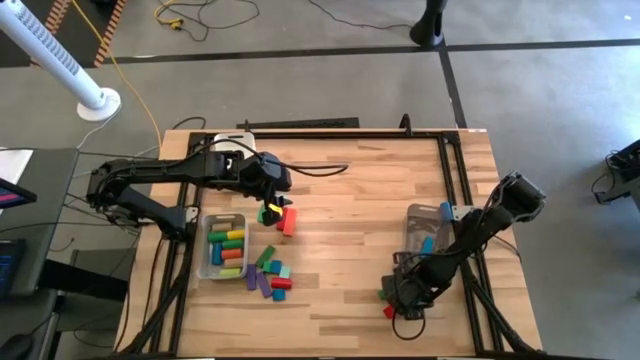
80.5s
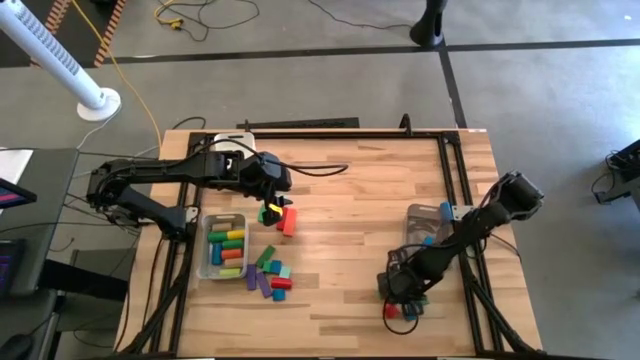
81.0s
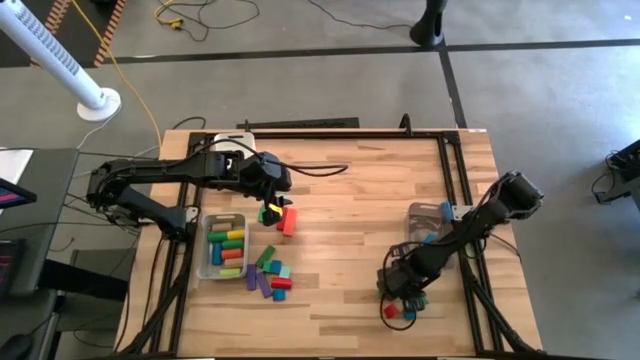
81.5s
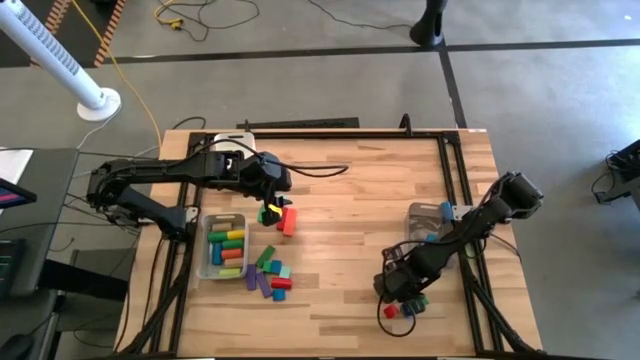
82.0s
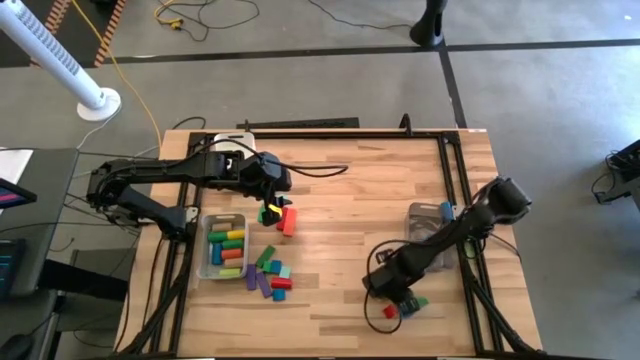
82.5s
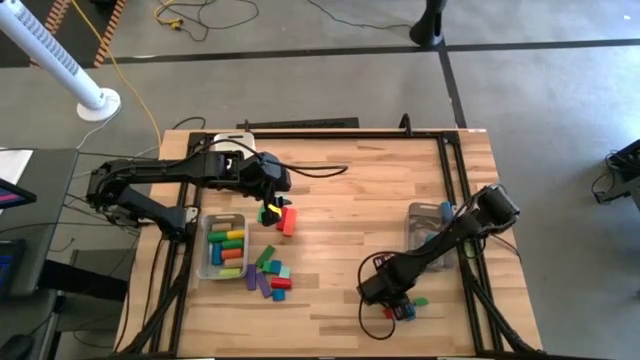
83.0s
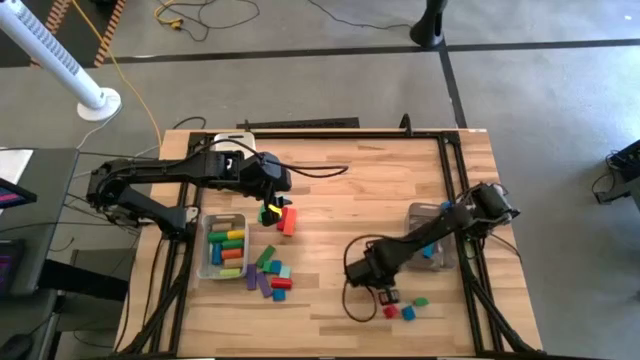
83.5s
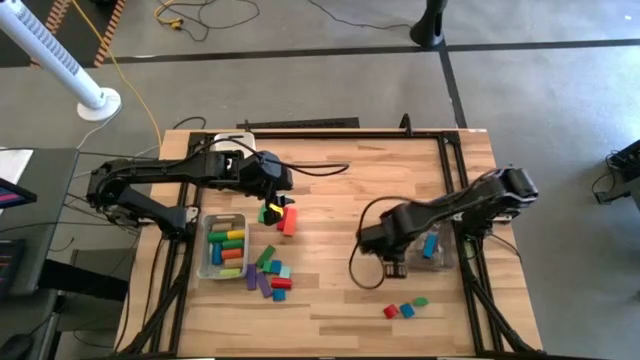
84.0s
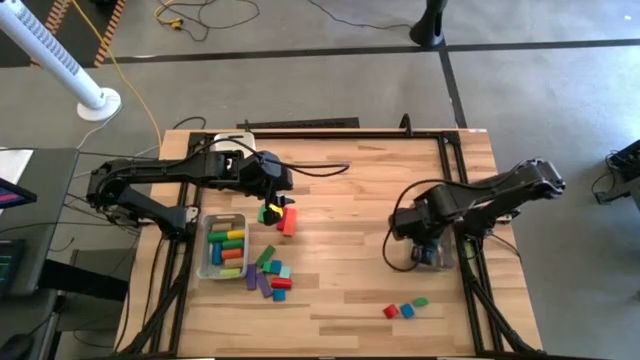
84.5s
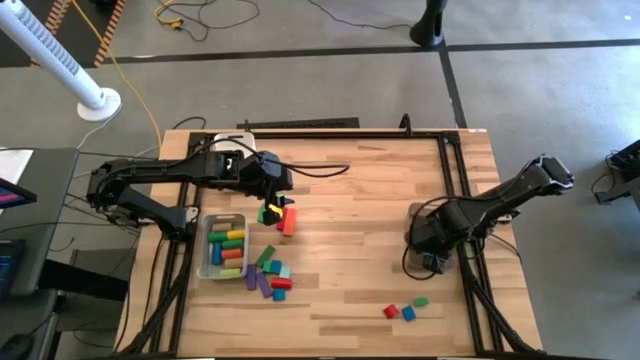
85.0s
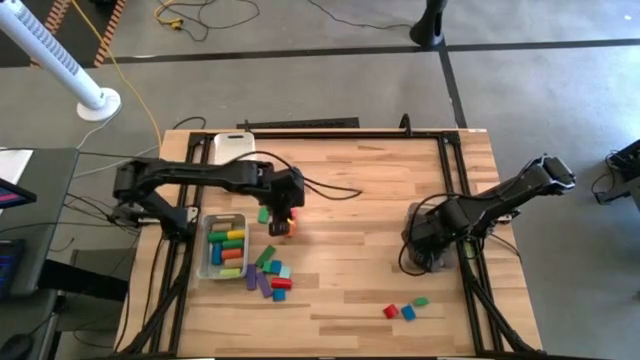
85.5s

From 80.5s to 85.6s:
Task: Sort blocks by size
Put the dark green rectangular block into the black bin

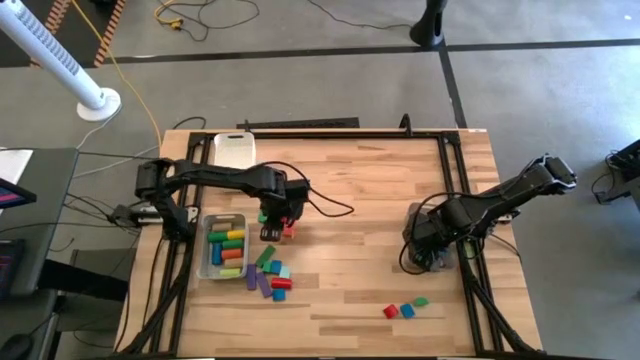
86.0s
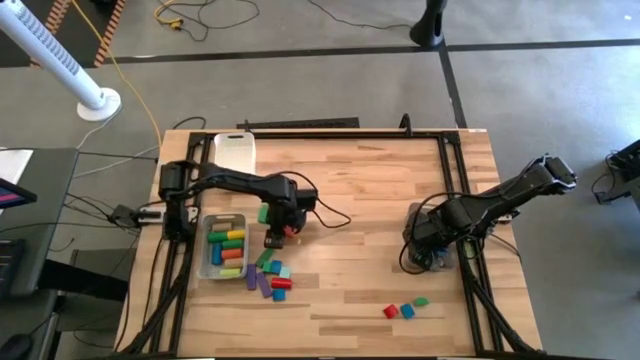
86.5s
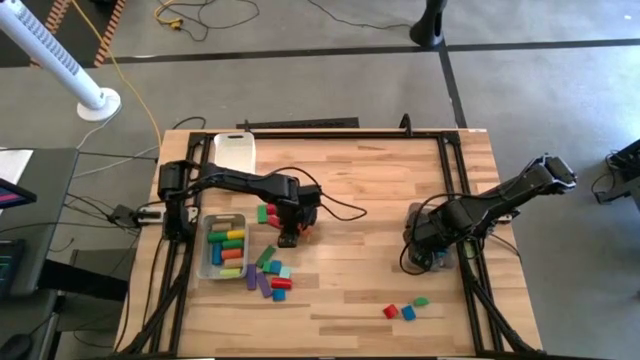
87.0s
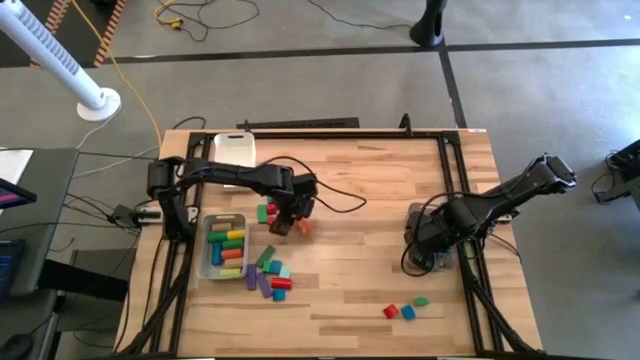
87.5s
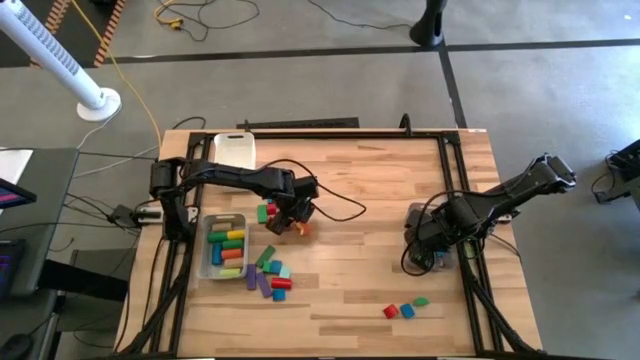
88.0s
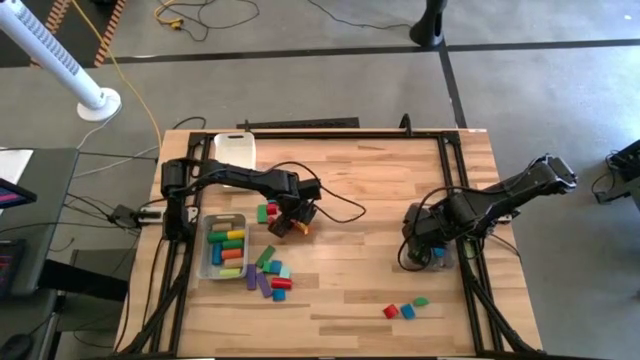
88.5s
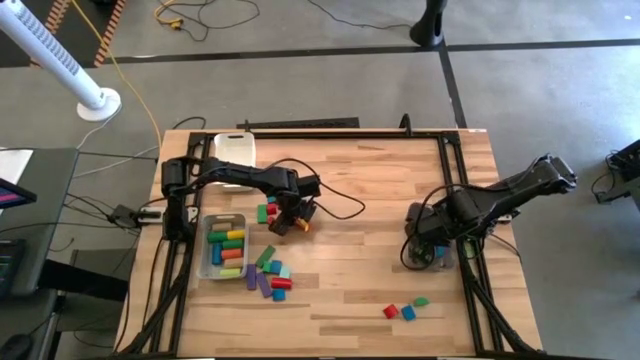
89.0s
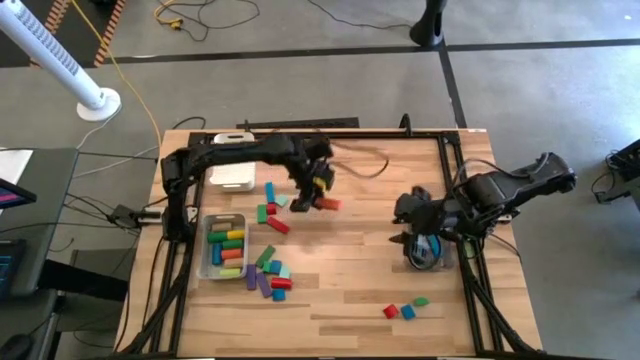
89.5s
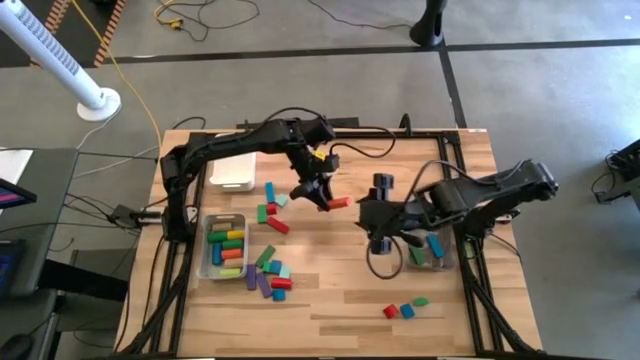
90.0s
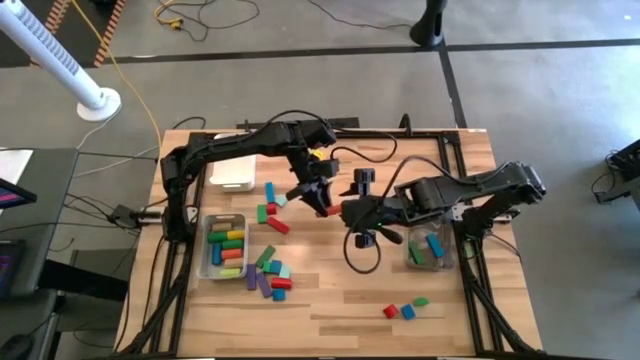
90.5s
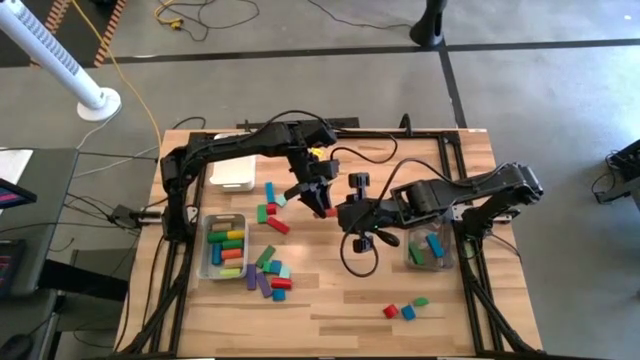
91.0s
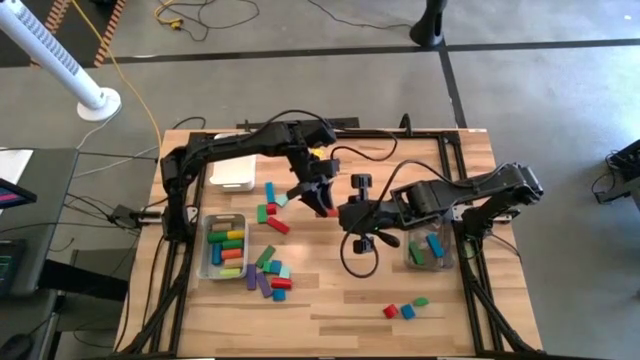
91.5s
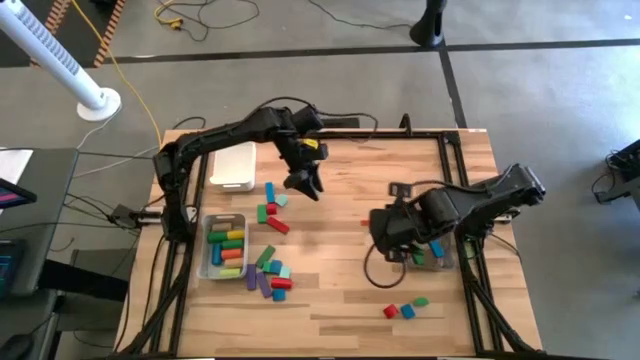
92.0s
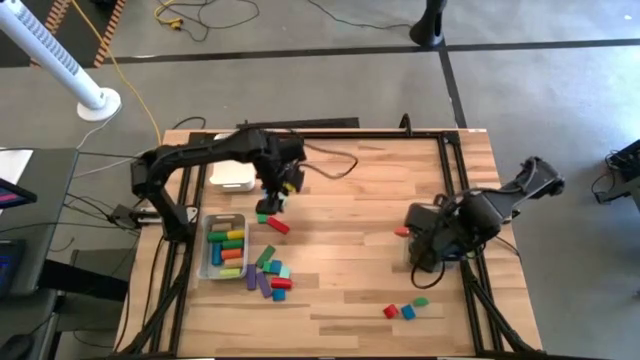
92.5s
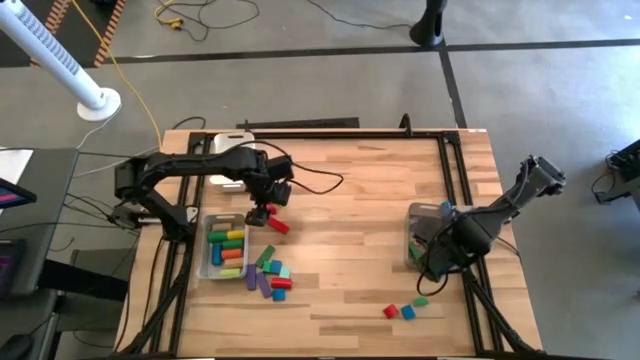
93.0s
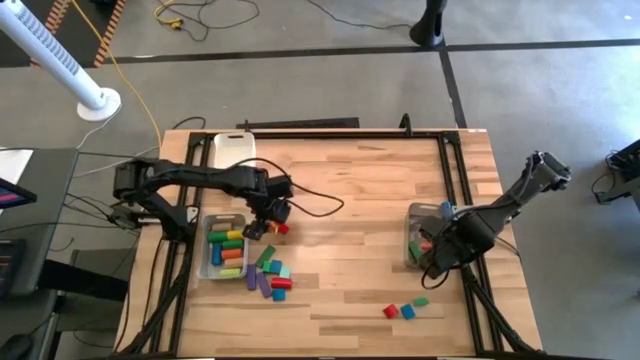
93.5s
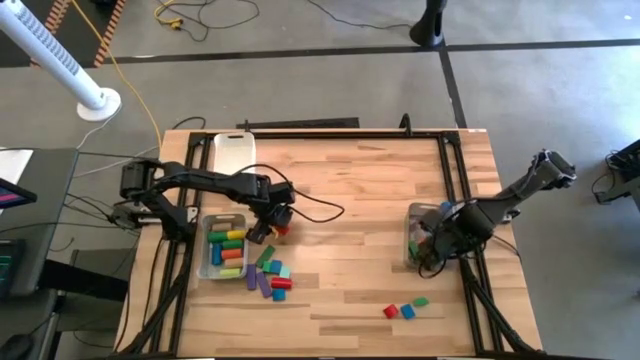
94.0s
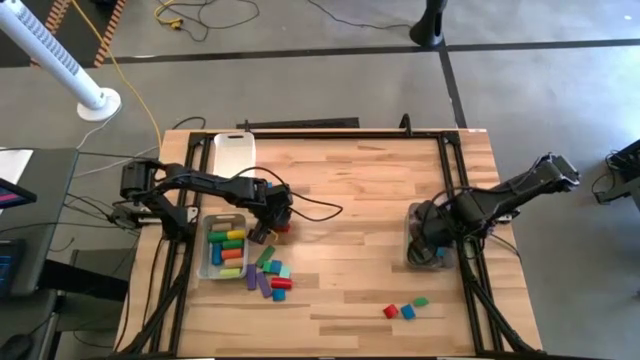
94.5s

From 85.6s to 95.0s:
Put the orange rectangular block into the black bin

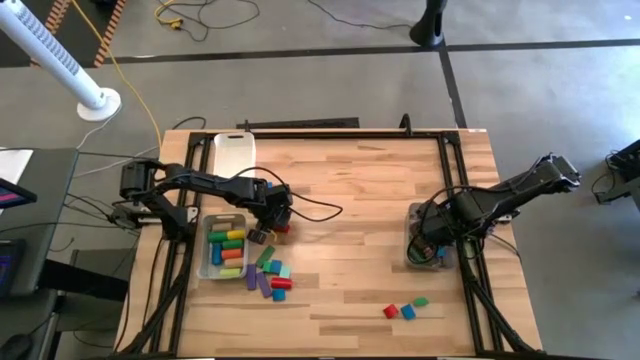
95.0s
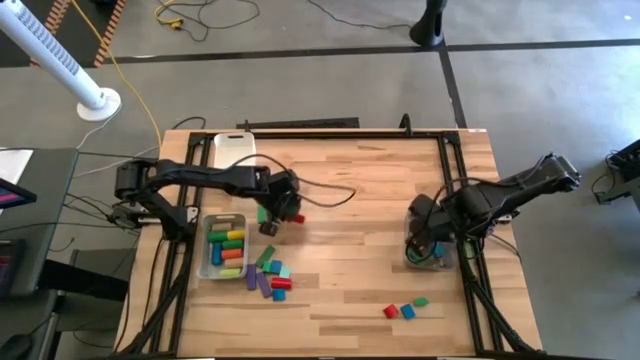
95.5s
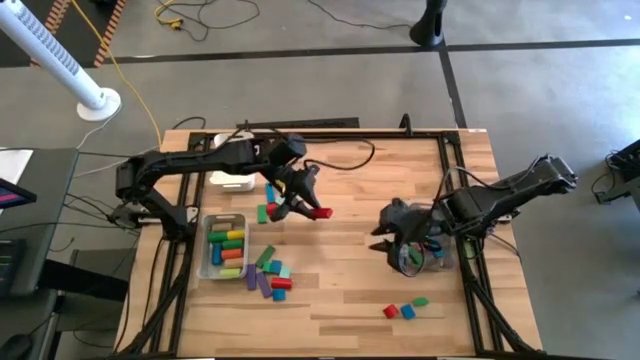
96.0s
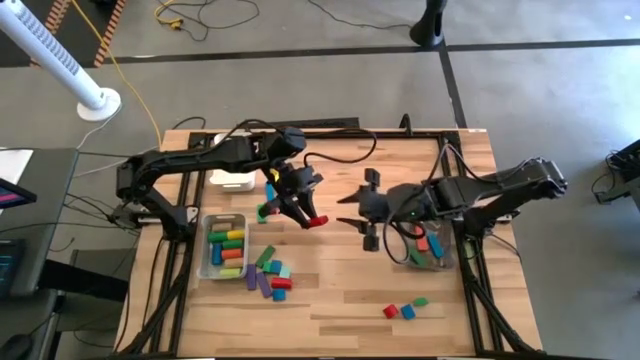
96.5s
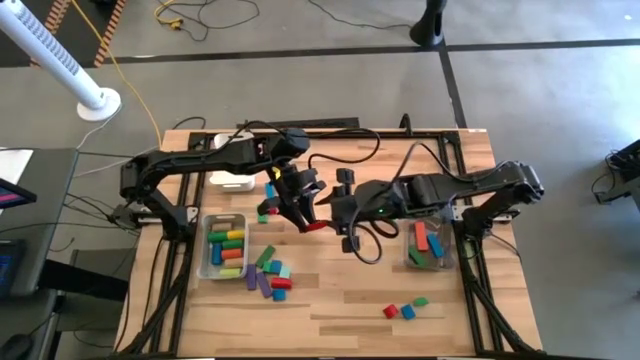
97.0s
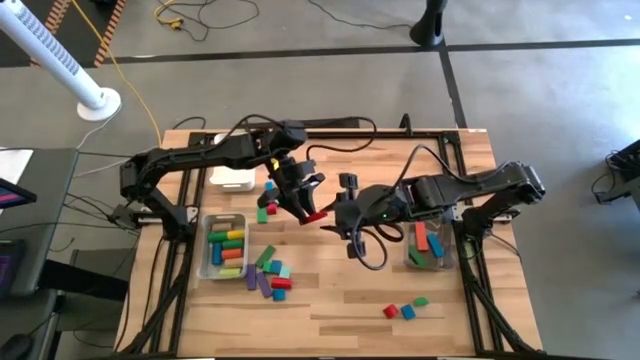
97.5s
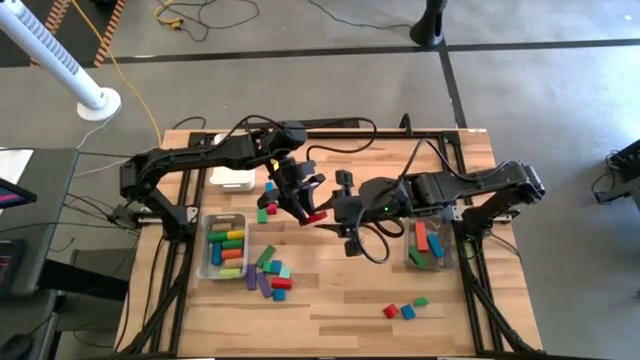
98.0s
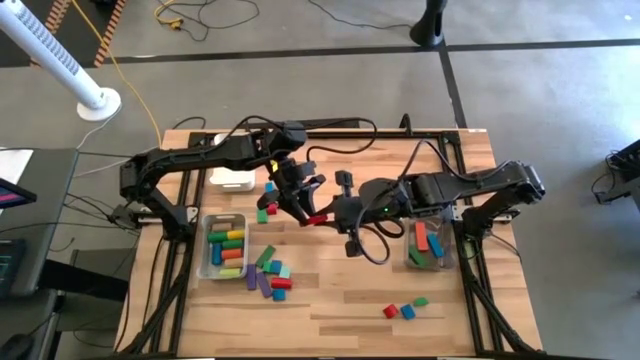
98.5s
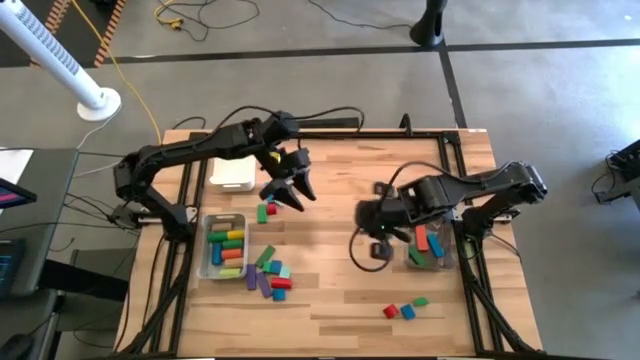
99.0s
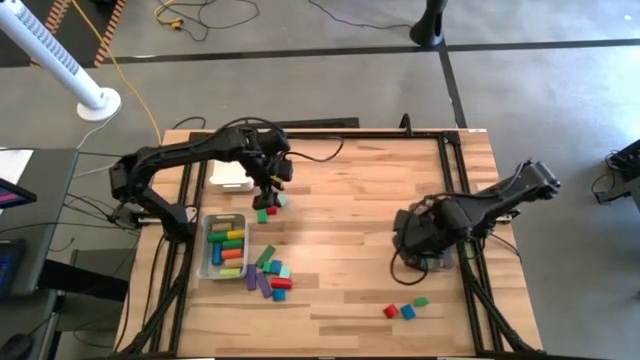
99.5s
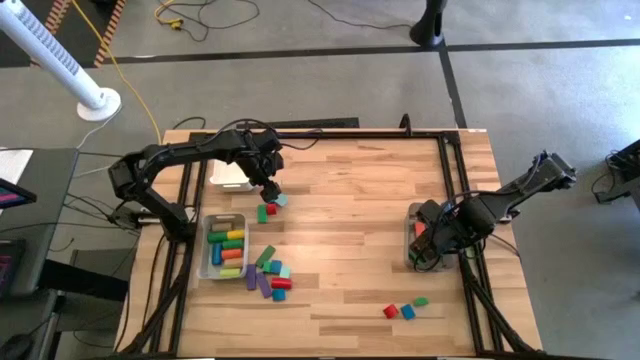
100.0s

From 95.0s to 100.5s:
Put the red rectangular block into the black bin

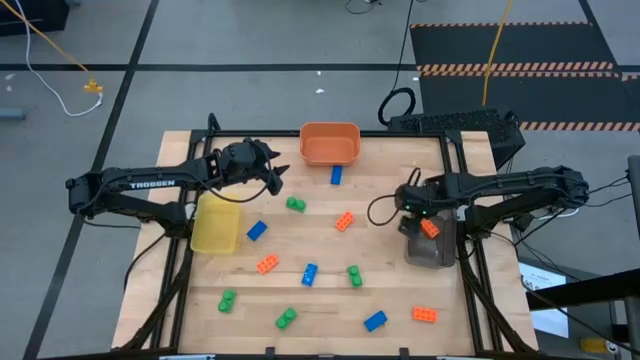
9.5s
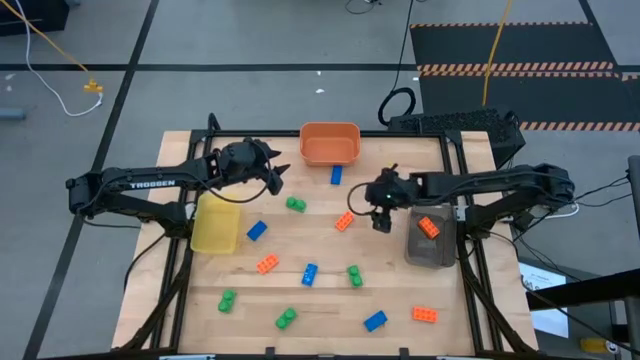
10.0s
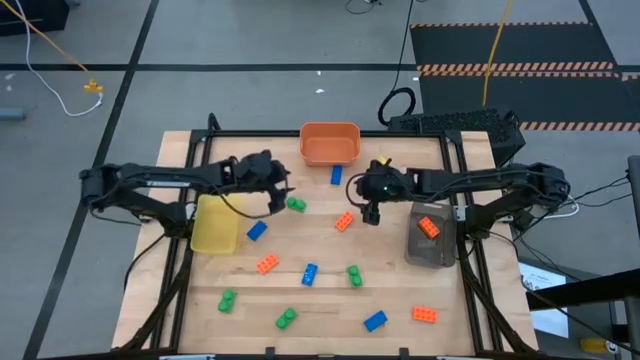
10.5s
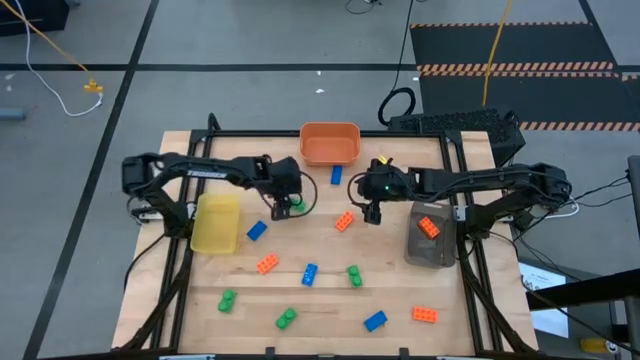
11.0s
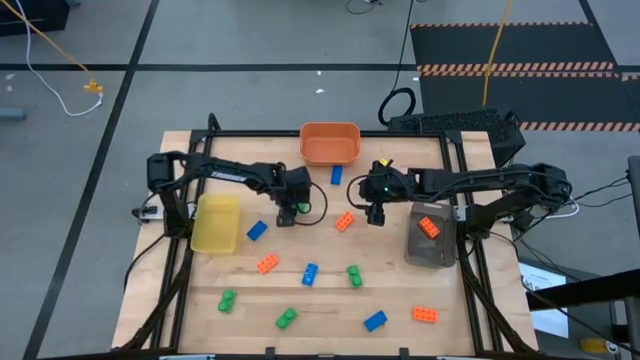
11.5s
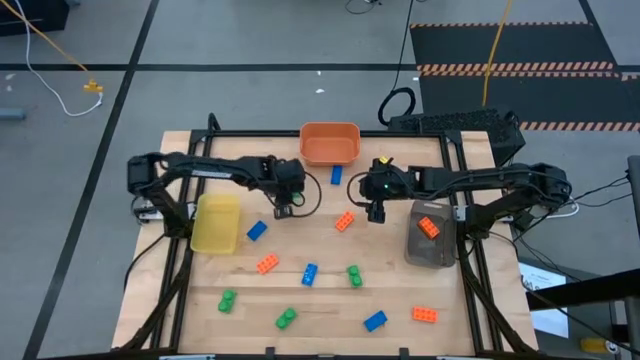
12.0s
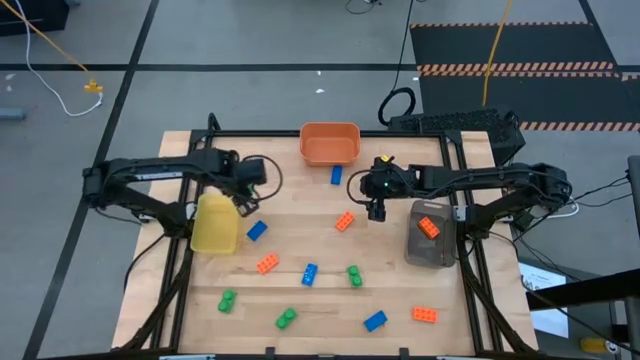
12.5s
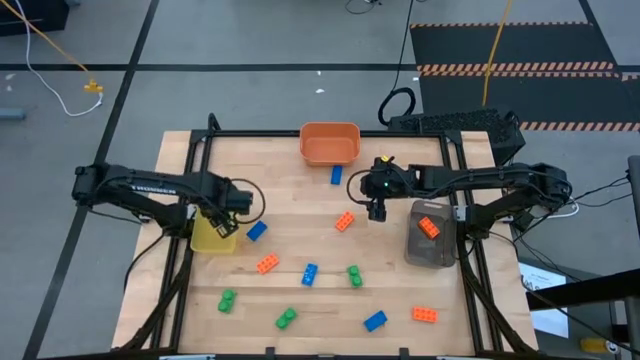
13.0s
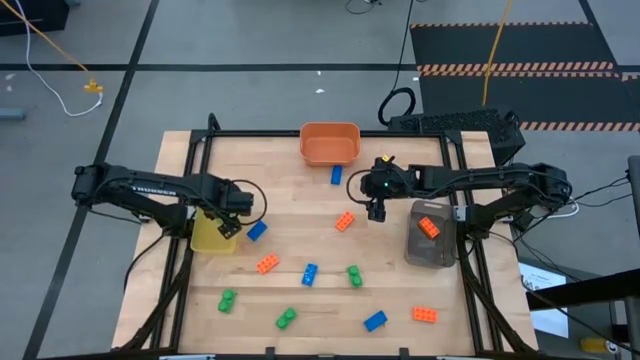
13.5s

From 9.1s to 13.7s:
Task: Sort & place blocks by color
Put the green game piece into the yellow bin
